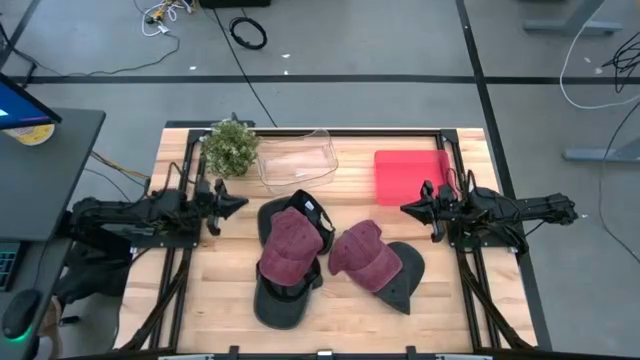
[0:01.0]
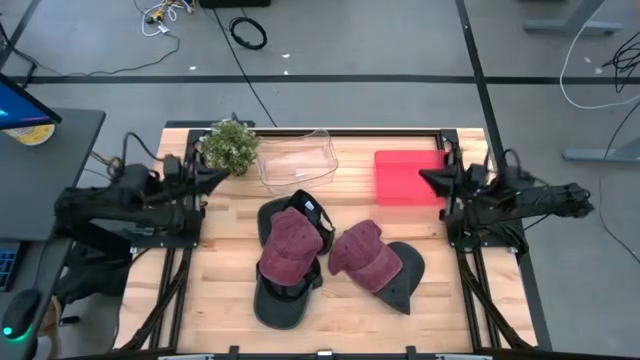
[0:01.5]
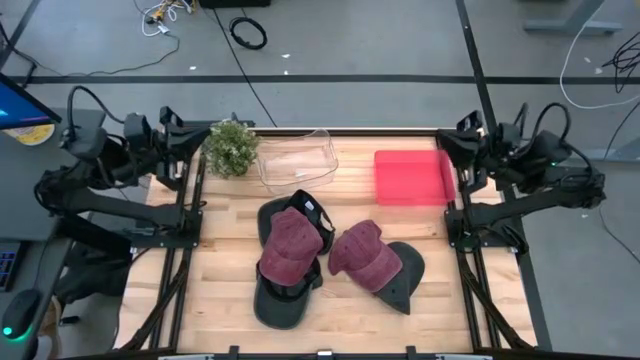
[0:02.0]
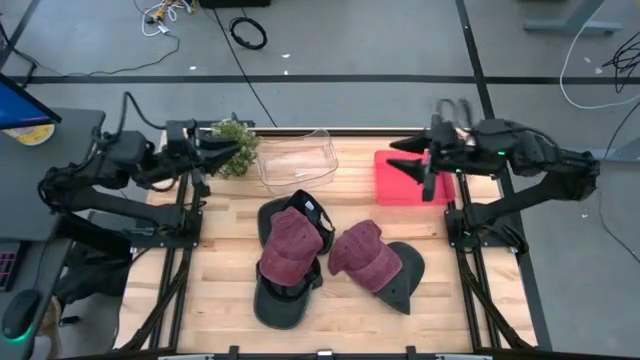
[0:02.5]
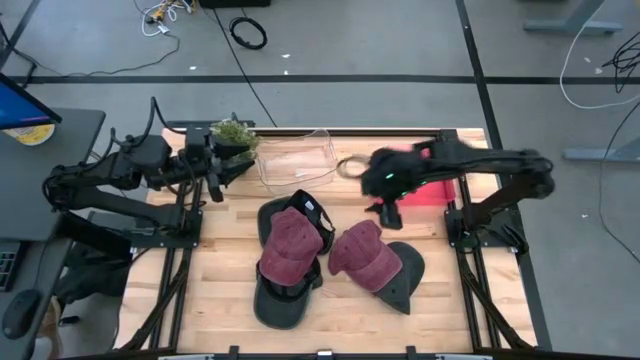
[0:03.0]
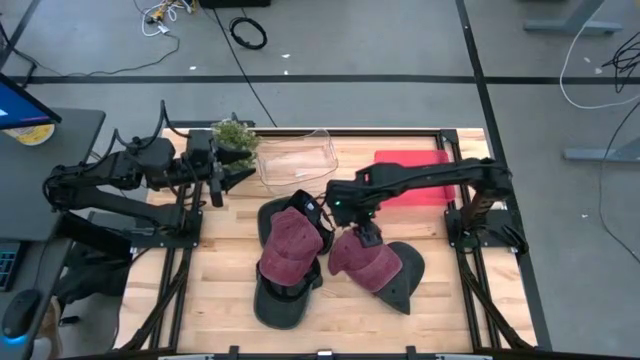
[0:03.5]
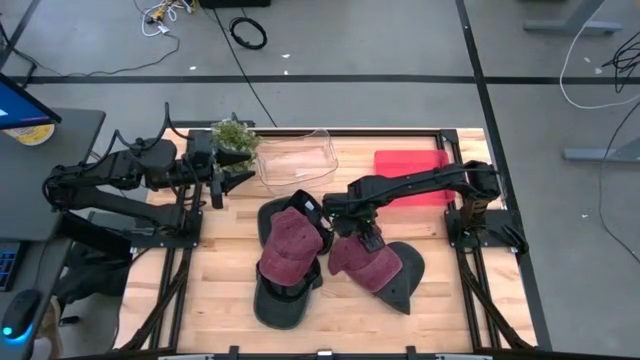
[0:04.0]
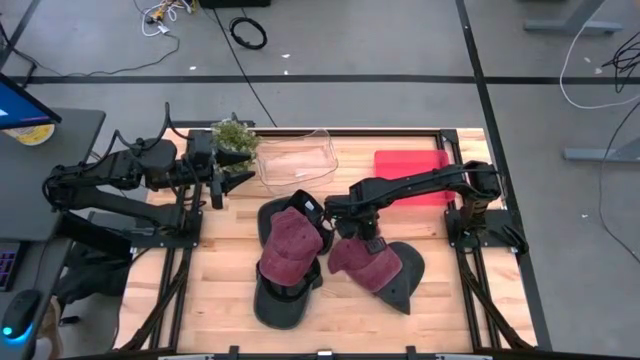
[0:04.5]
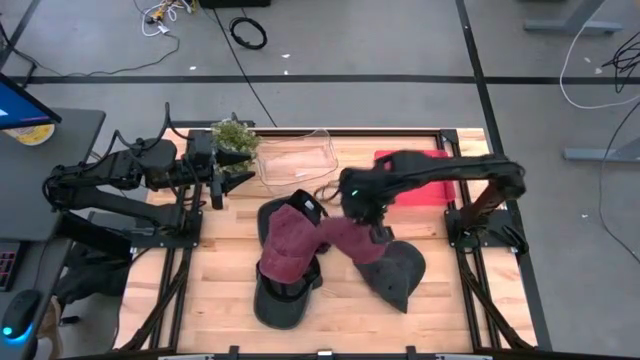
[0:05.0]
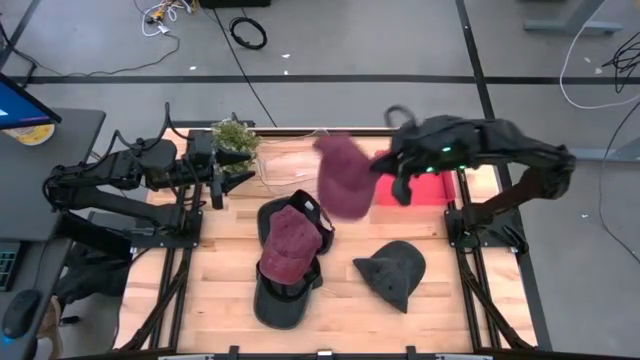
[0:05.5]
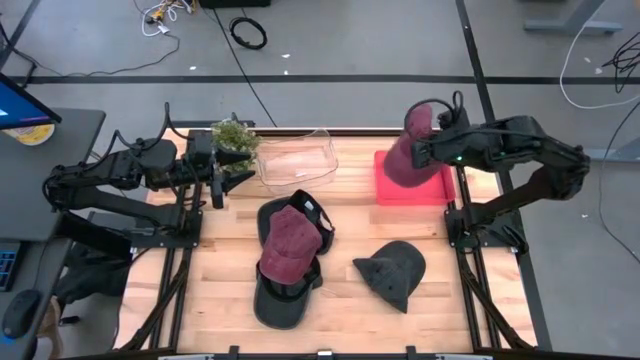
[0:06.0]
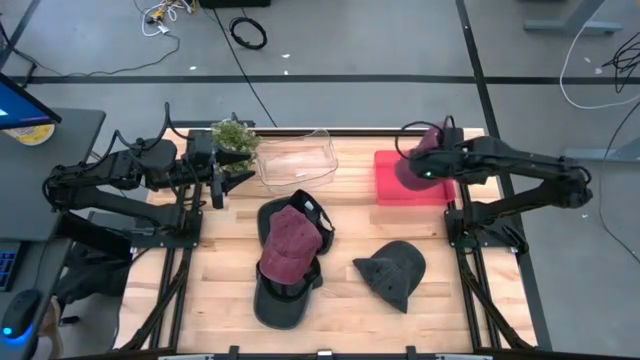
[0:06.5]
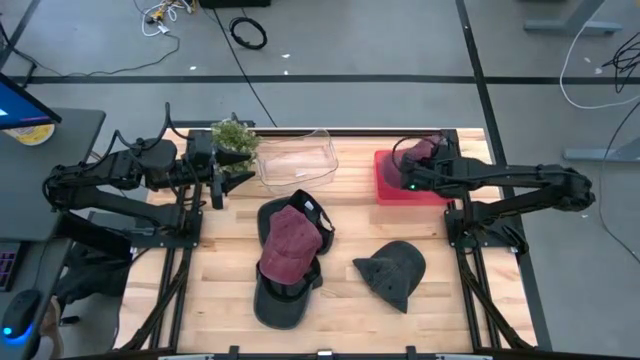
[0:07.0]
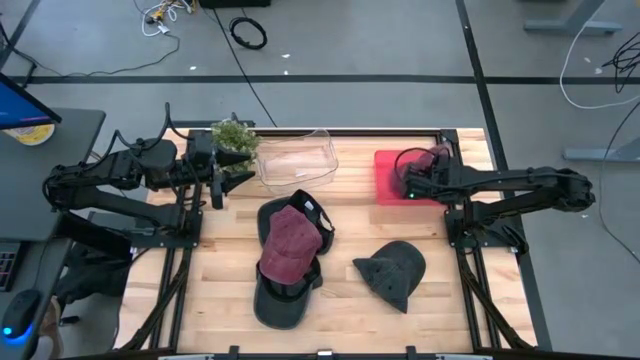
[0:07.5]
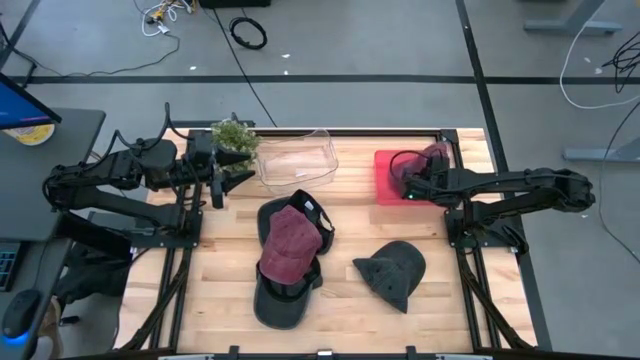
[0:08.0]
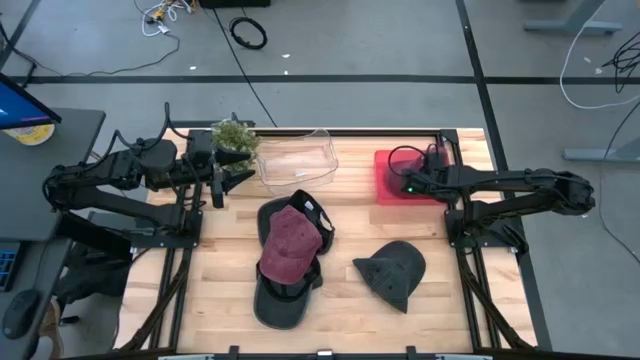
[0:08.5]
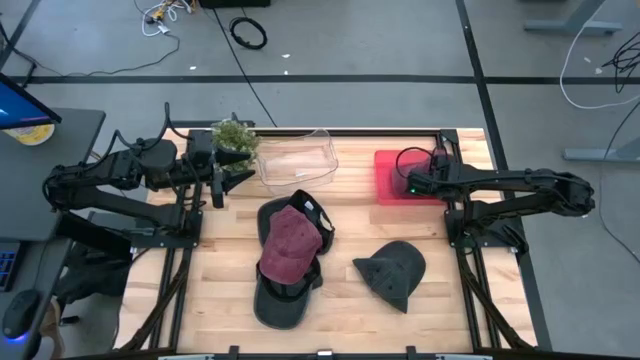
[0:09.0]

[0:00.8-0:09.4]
Task: Pick & Place hat
Put the right red cap into the red bin

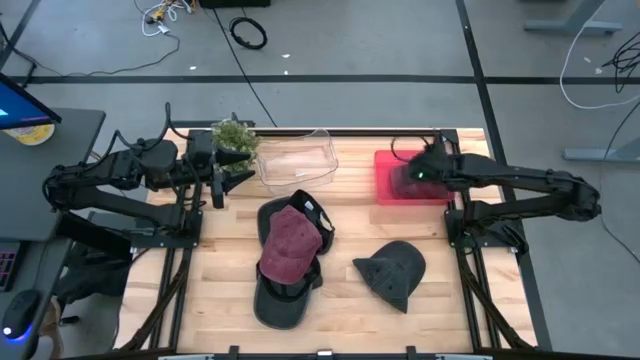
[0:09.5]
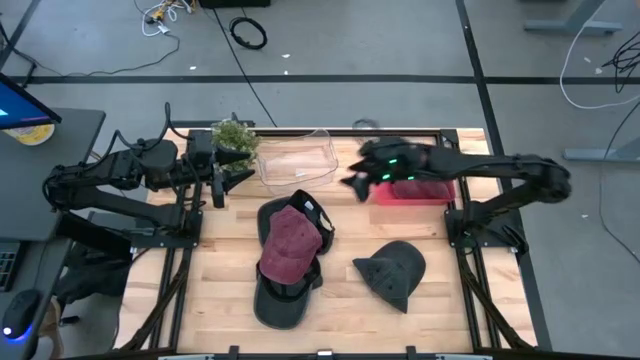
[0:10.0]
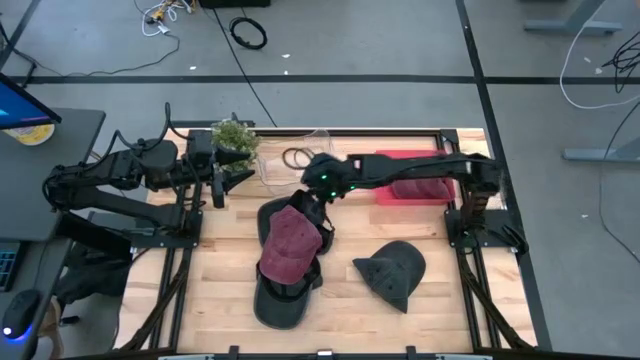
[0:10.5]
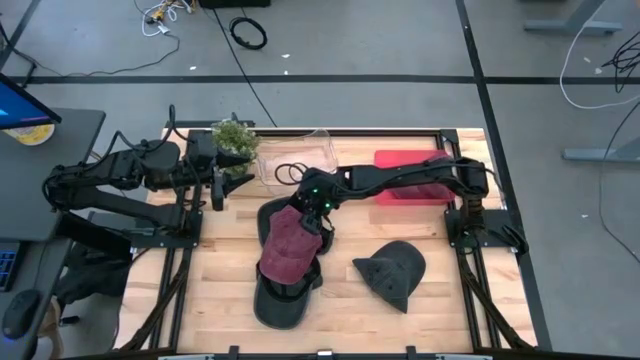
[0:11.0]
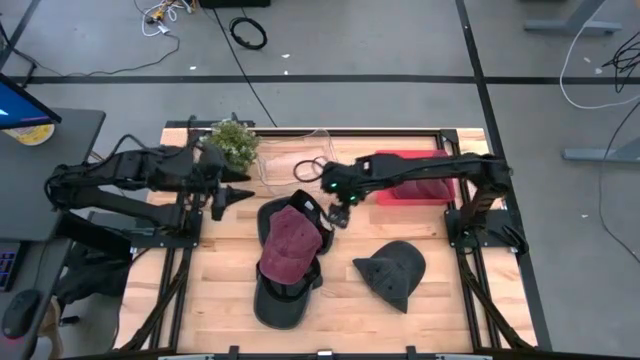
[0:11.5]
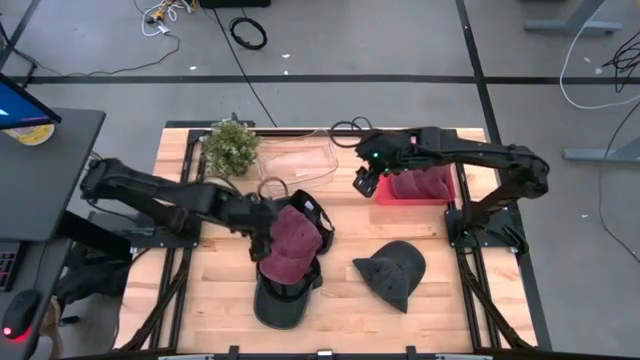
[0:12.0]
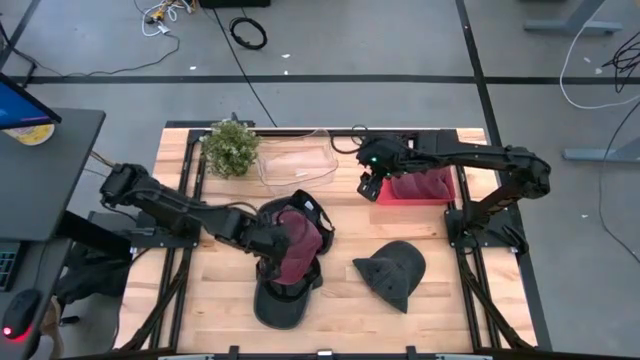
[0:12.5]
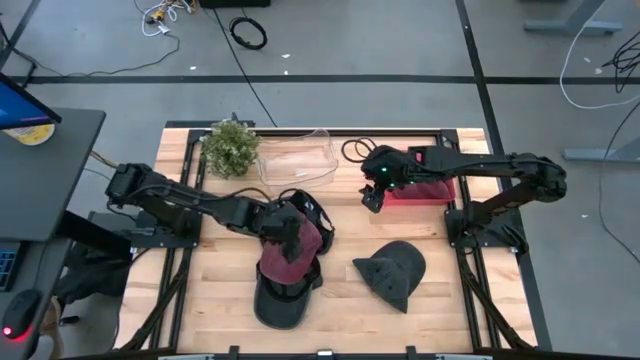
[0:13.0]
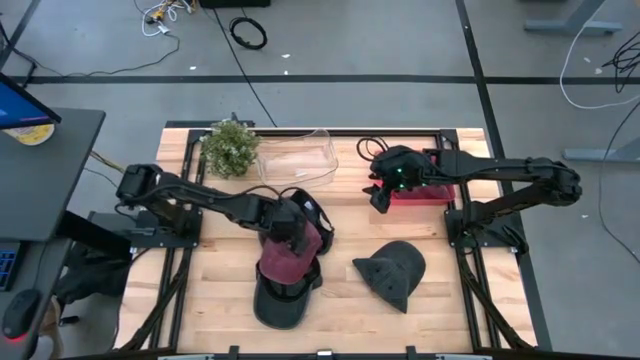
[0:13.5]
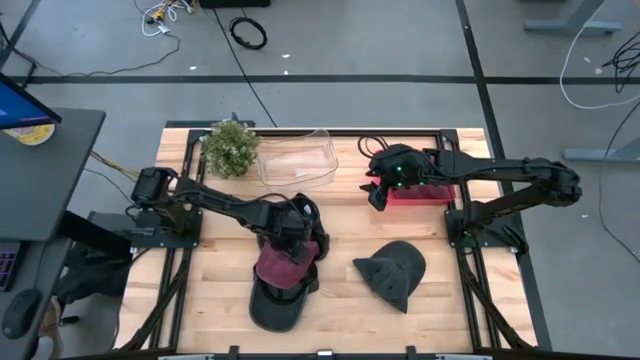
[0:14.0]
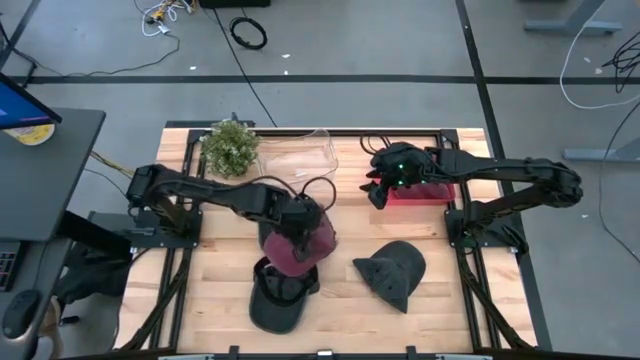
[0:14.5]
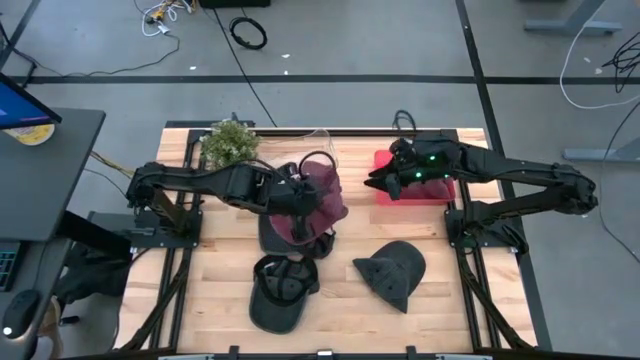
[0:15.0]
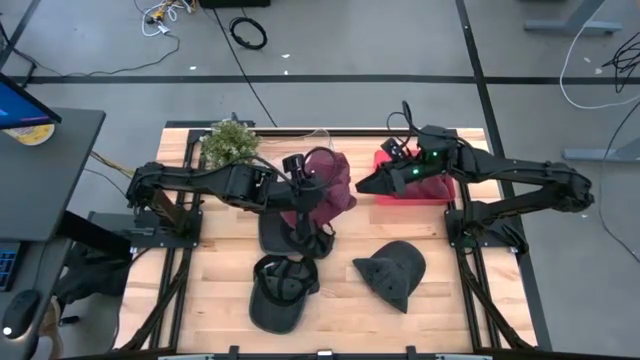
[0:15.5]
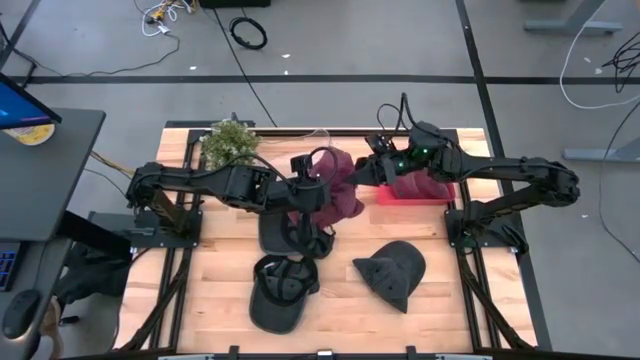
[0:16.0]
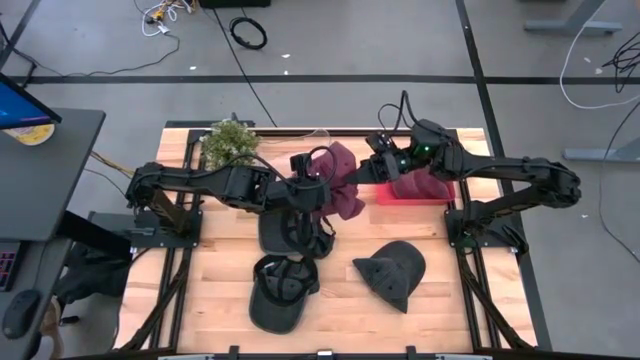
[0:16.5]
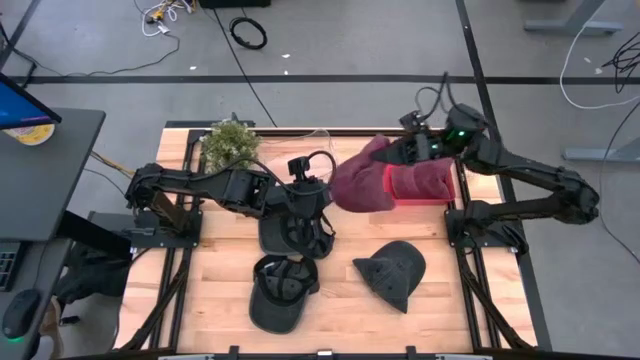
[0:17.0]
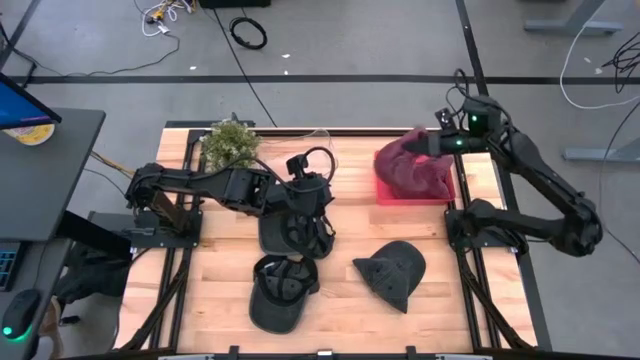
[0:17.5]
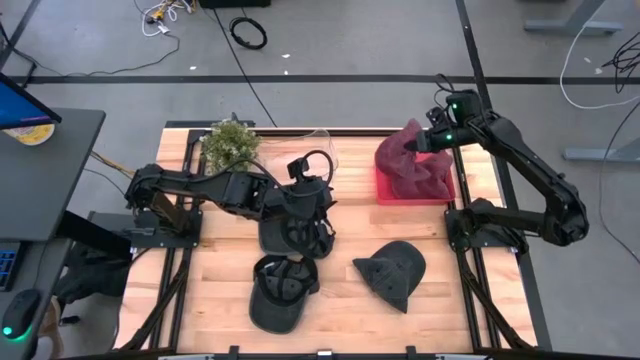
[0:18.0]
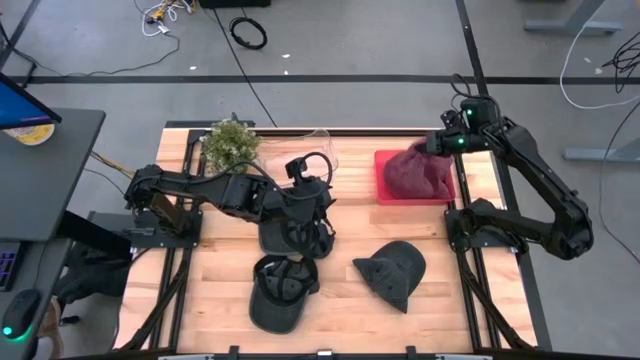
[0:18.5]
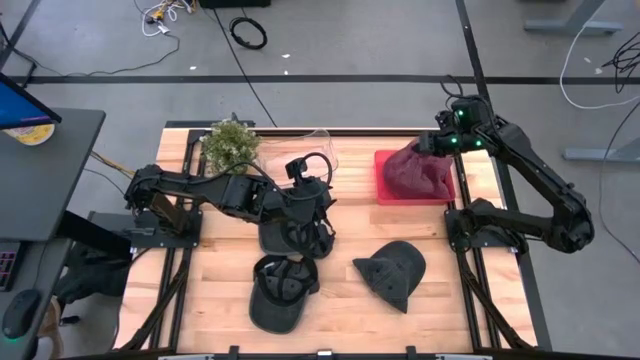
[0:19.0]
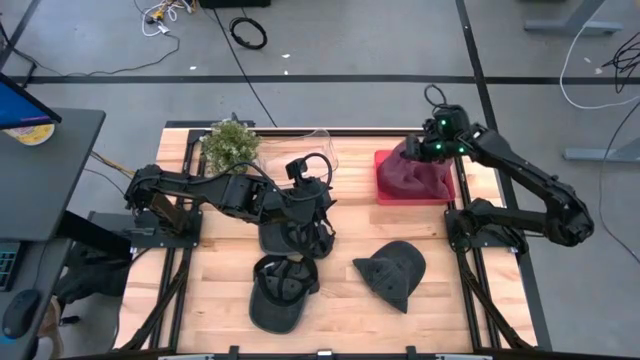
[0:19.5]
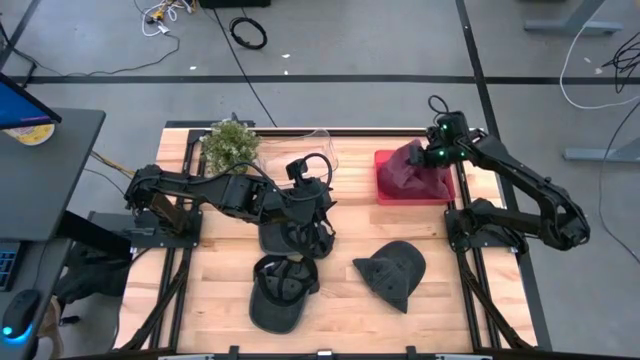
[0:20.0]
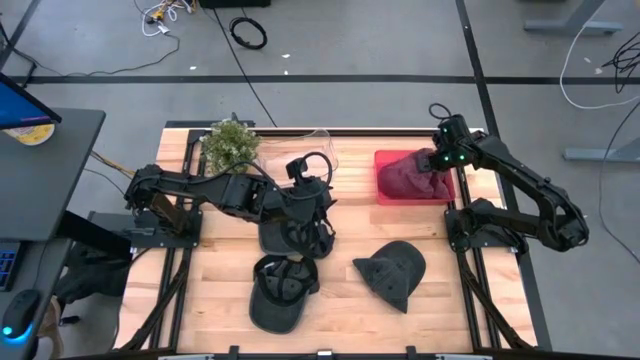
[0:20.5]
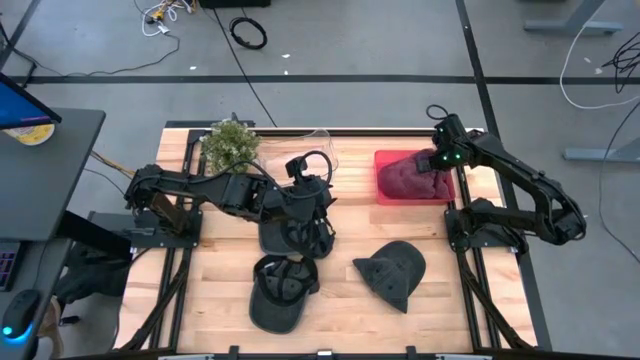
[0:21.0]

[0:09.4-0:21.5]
Put the red cap into the red bin
